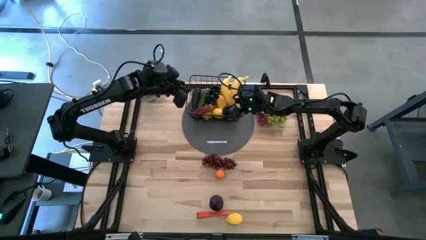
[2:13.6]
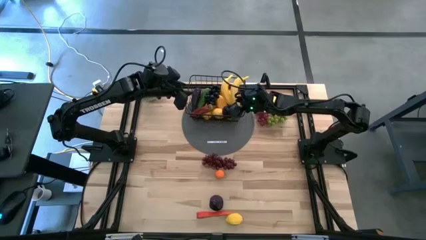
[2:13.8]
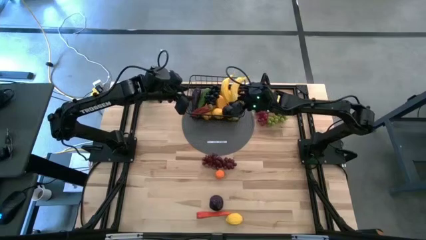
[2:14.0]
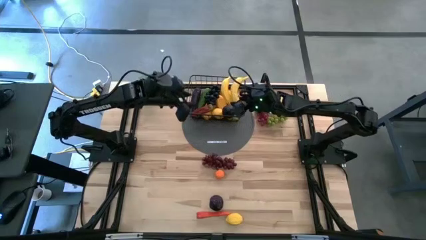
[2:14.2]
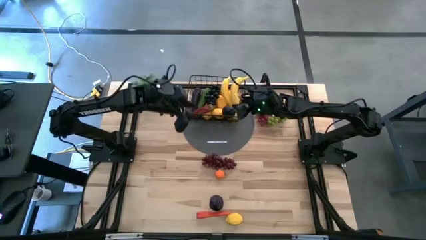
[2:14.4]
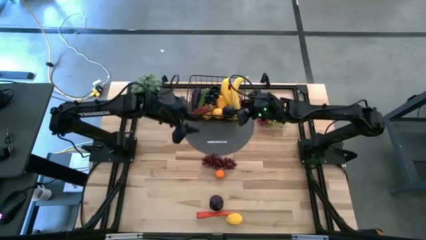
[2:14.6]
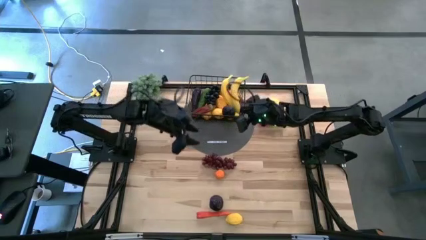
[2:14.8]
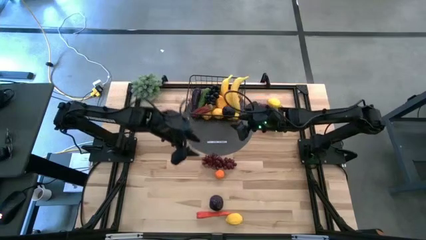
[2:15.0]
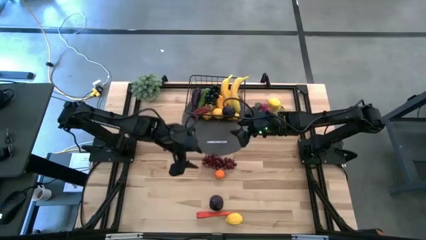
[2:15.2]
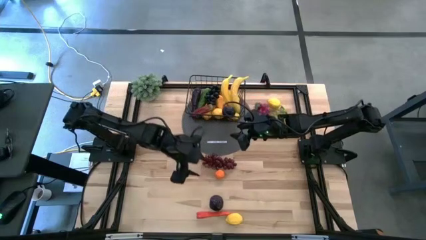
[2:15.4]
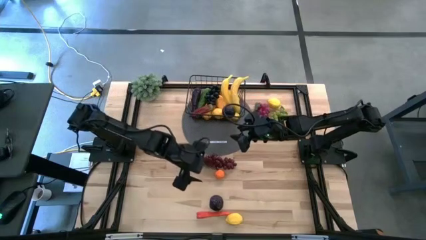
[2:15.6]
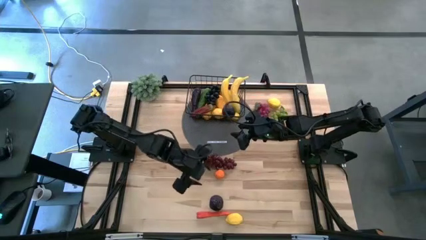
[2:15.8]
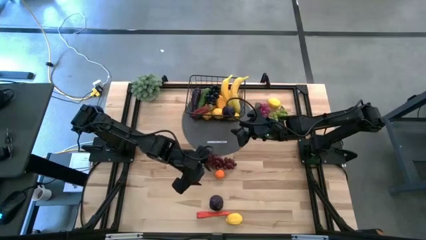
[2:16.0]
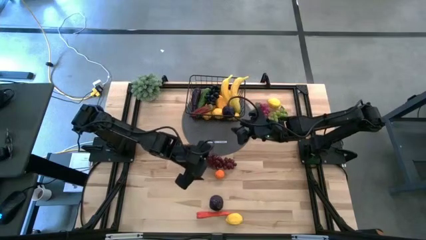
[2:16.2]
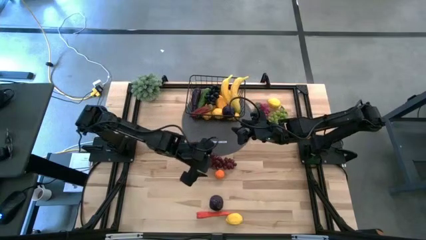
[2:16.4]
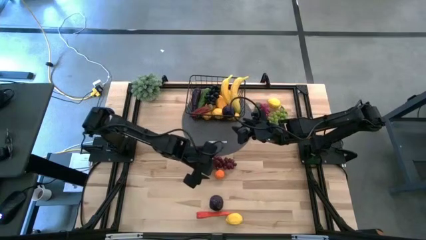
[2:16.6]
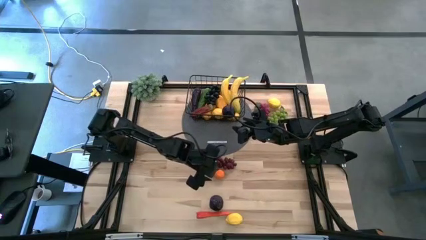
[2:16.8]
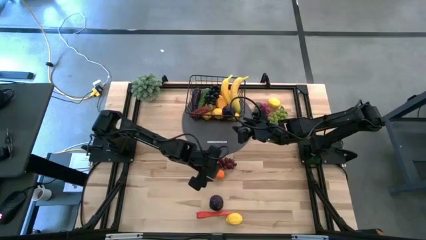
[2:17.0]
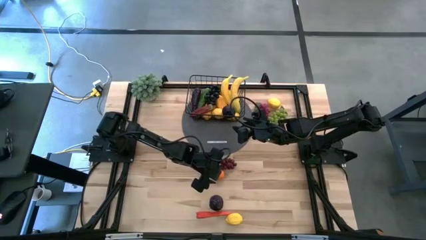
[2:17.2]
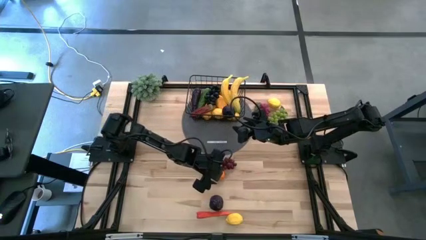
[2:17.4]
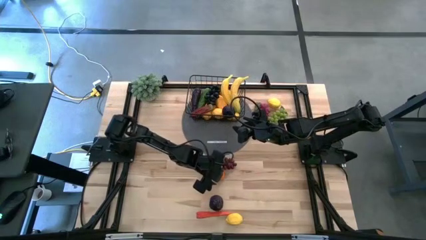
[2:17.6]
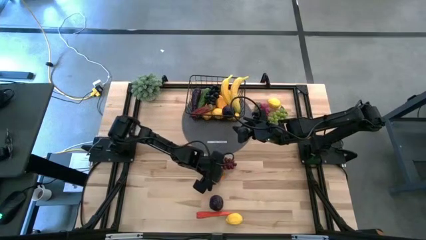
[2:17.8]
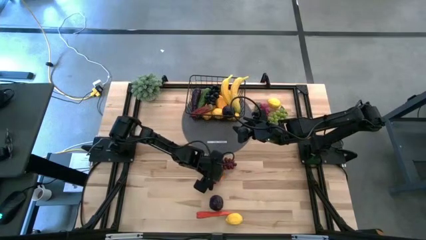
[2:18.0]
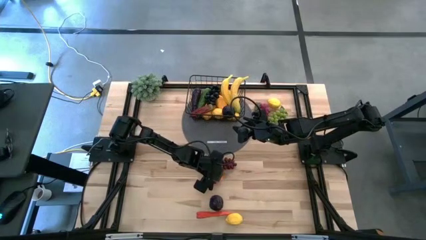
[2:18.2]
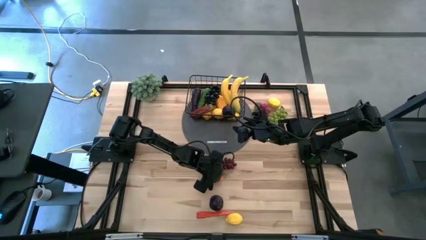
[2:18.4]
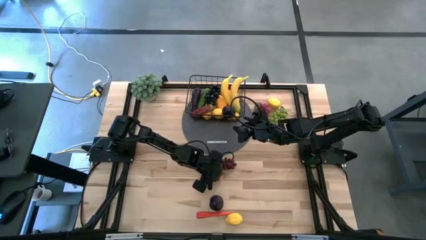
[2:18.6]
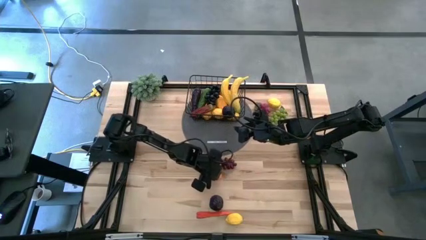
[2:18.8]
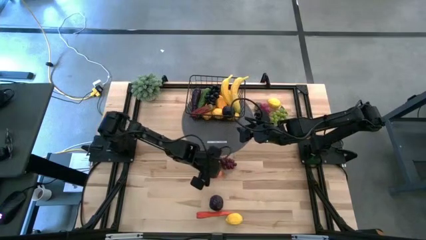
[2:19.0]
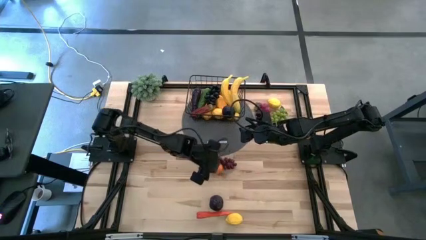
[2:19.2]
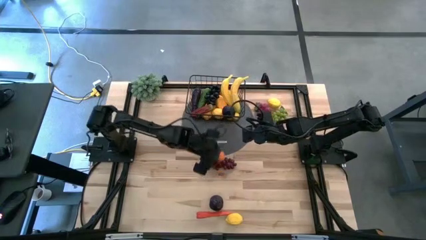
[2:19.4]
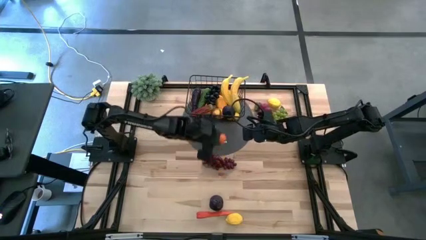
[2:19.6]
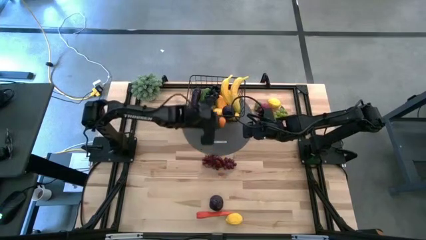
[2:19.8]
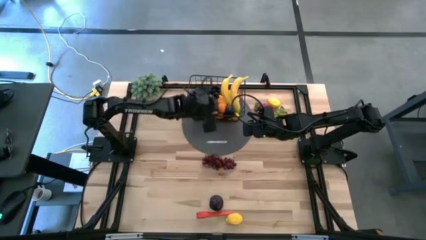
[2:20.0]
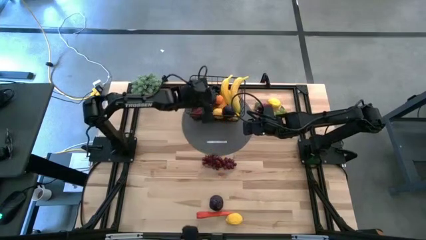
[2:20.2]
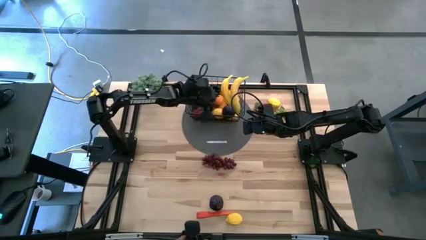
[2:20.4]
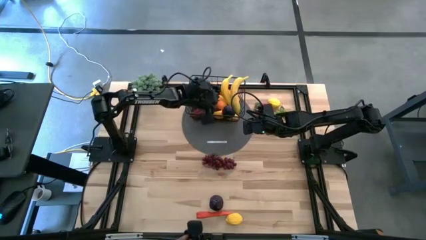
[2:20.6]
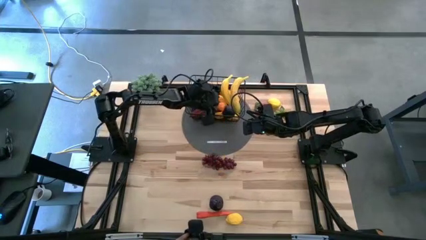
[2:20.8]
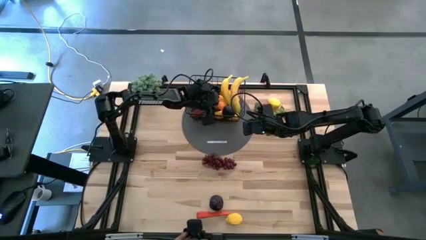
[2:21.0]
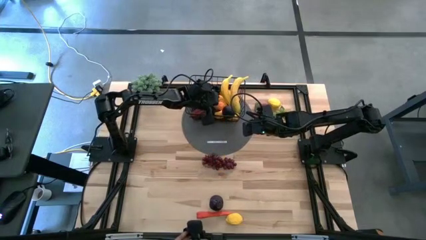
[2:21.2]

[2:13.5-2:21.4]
Task: Build produce basket
Put the orange into the black wire basket

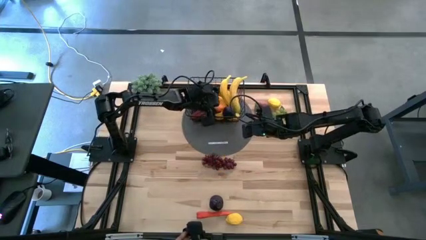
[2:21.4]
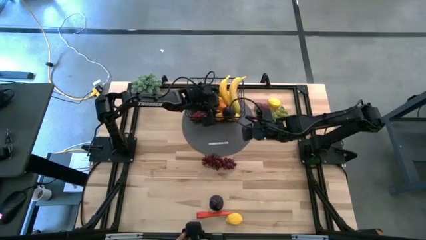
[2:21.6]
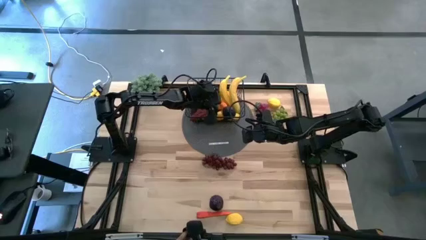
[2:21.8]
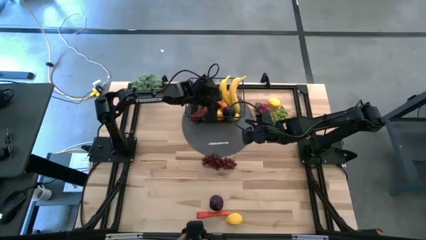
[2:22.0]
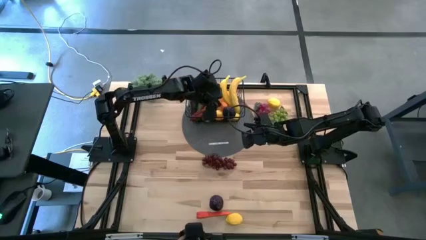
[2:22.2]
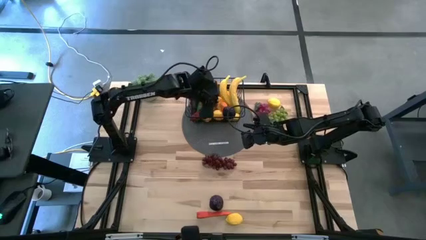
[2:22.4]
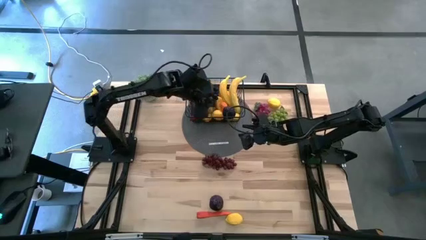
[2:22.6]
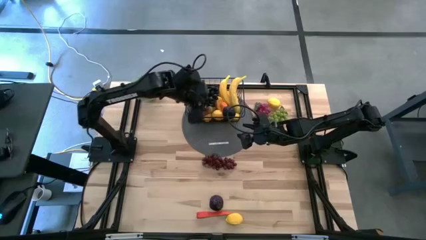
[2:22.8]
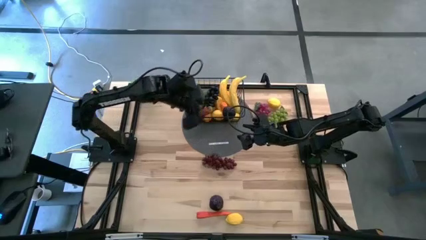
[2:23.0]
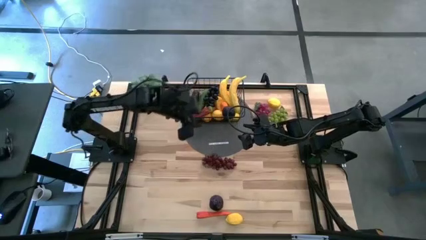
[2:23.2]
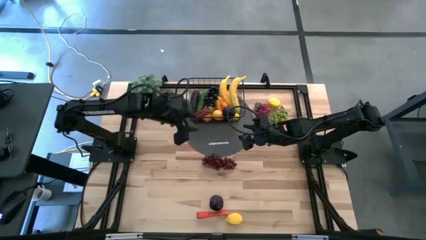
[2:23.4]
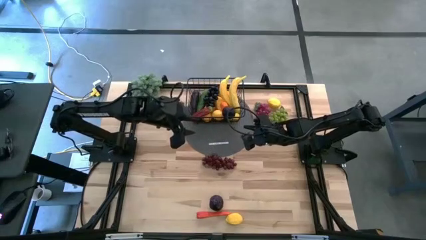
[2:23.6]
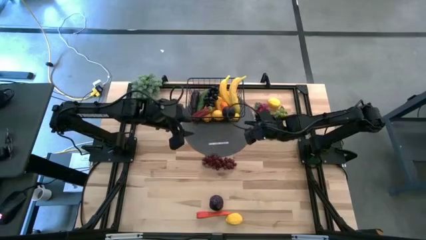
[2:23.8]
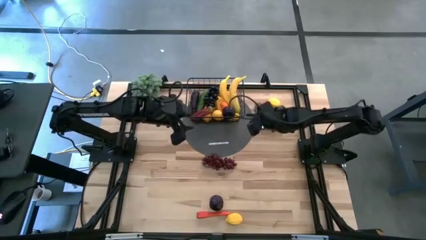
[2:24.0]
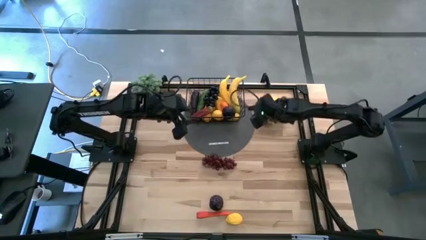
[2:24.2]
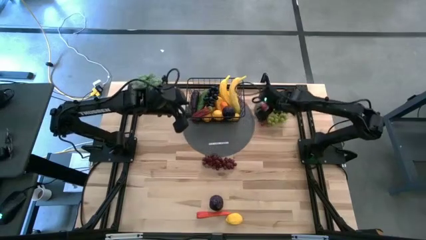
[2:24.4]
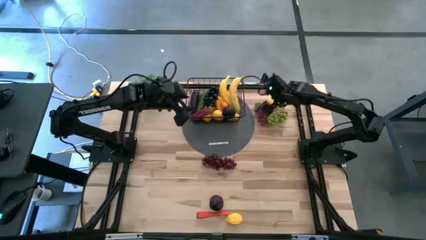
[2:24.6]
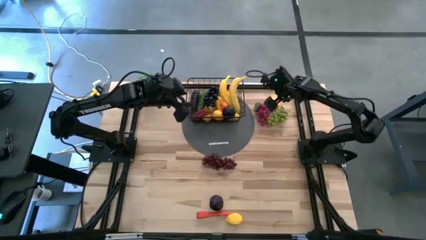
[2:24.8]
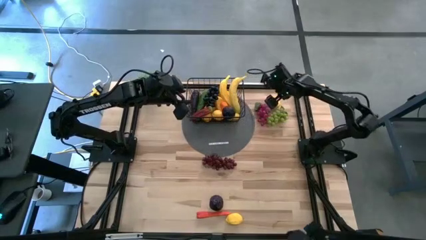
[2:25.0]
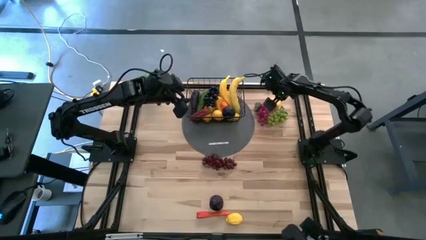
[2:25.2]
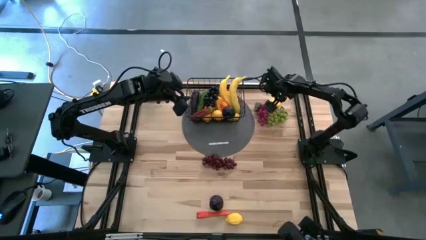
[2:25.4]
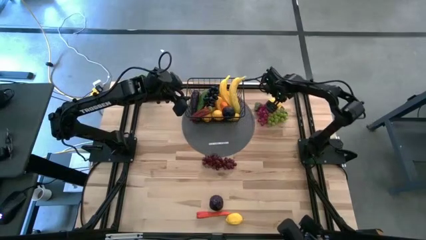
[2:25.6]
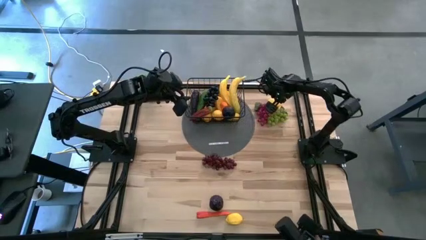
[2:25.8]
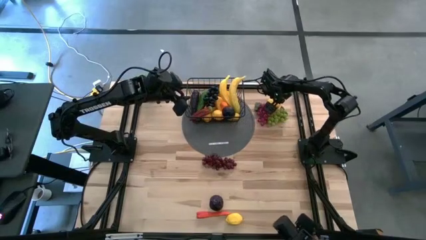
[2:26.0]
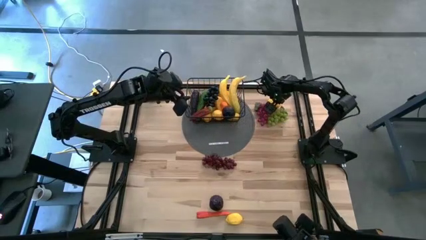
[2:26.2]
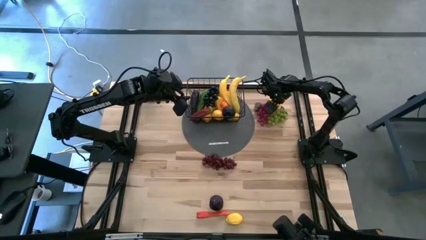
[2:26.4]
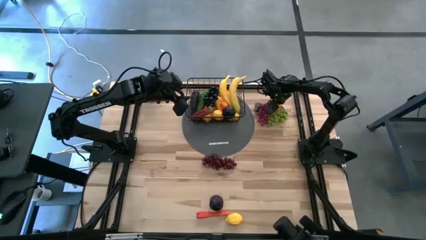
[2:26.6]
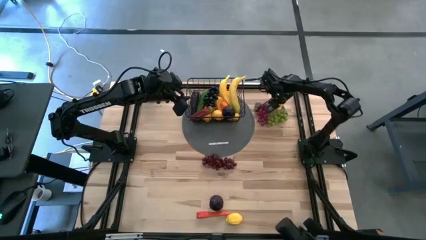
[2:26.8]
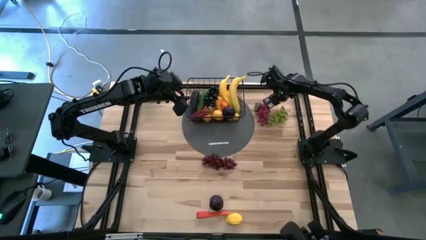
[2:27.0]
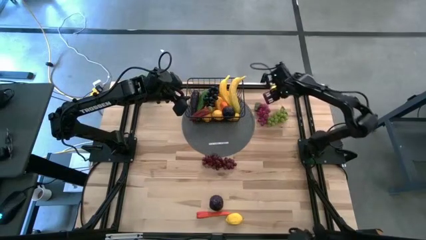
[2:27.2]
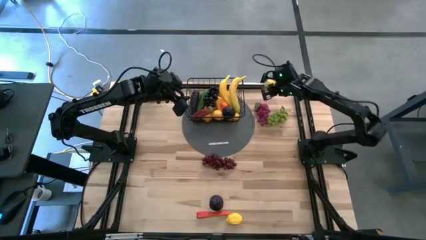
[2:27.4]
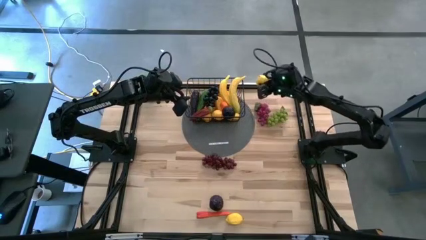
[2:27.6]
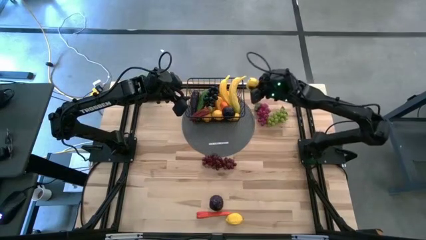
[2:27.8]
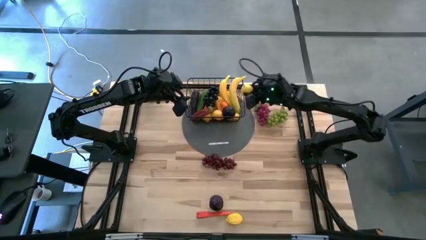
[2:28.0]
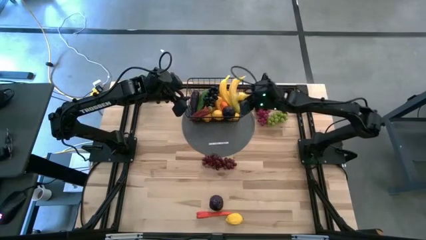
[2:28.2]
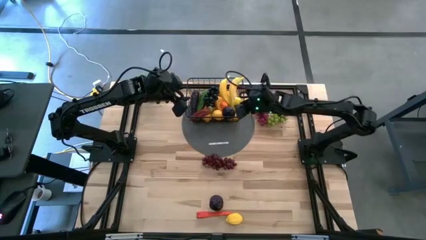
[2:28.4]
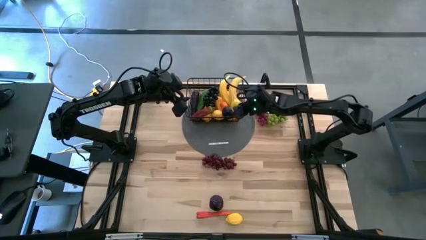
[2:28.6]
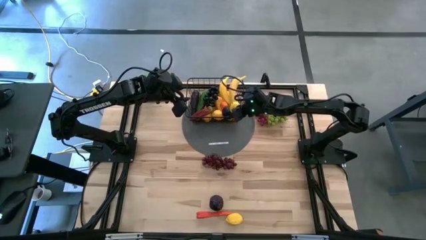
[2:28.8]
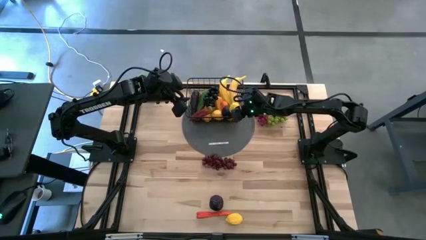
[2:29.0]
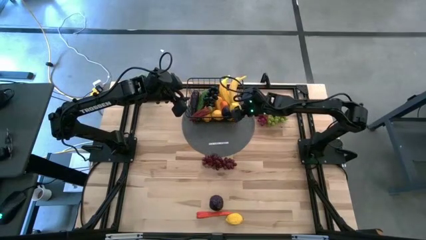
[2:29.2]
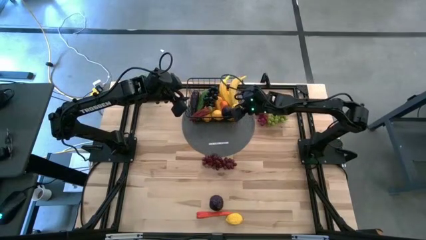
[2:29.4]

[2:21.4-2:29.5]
Put the top yellow lemon into the black wire basket
